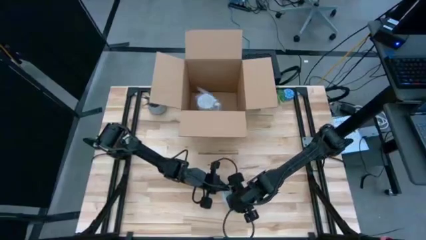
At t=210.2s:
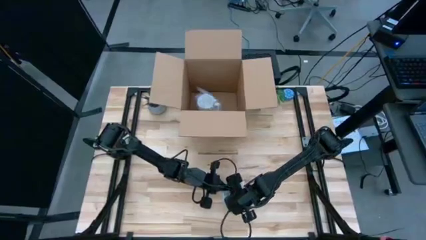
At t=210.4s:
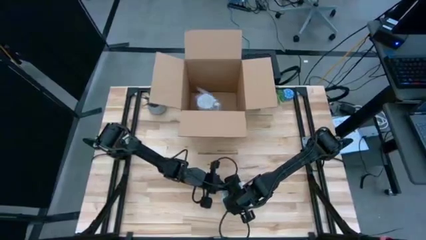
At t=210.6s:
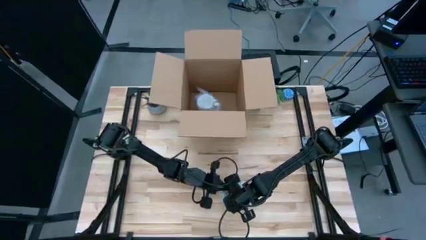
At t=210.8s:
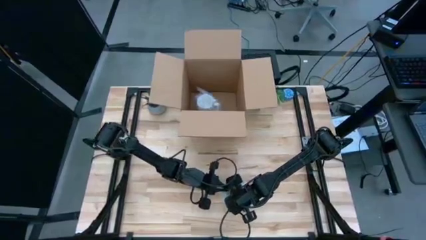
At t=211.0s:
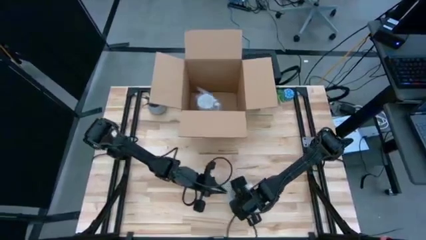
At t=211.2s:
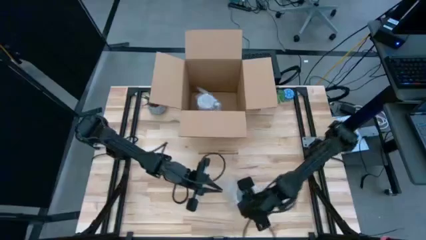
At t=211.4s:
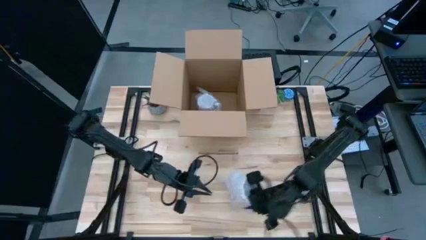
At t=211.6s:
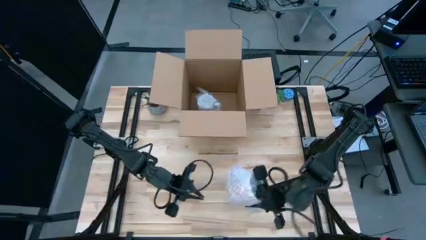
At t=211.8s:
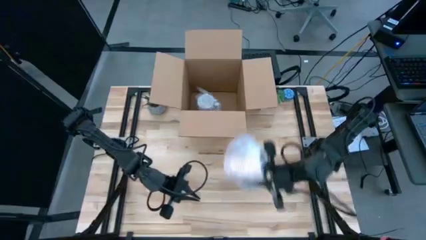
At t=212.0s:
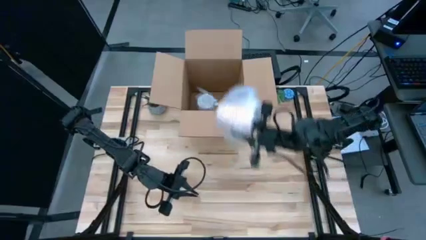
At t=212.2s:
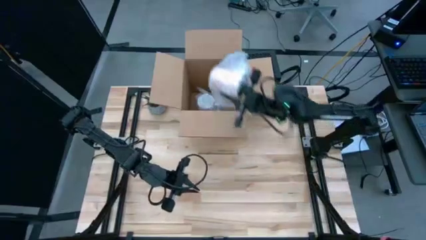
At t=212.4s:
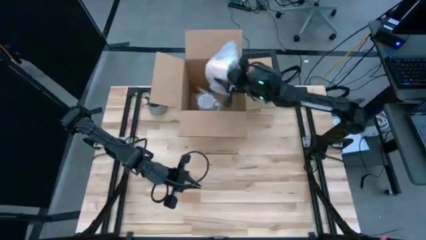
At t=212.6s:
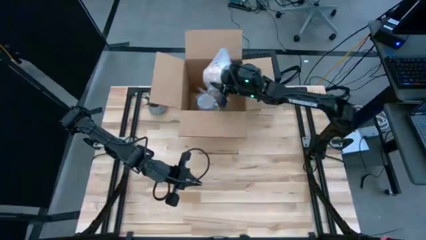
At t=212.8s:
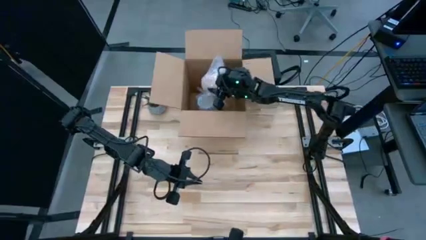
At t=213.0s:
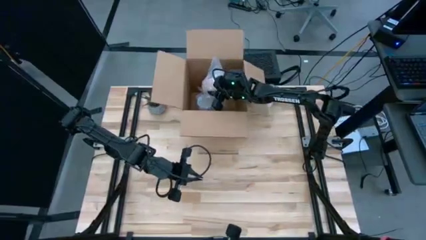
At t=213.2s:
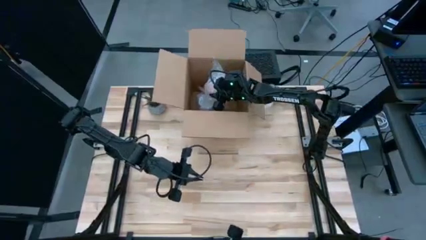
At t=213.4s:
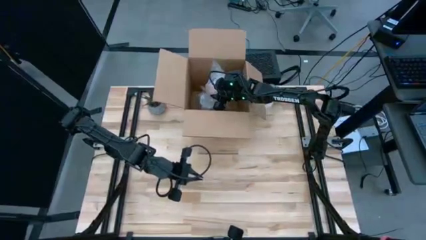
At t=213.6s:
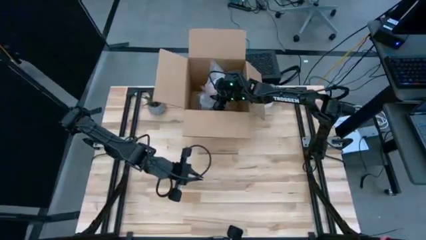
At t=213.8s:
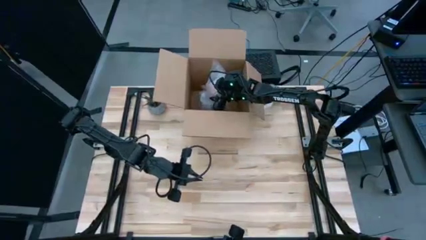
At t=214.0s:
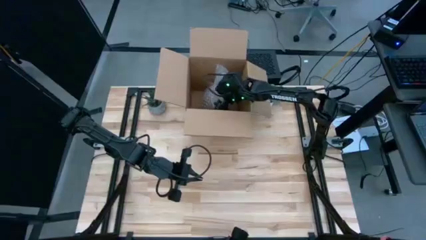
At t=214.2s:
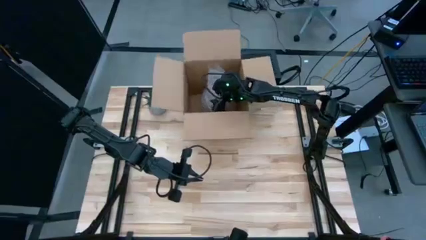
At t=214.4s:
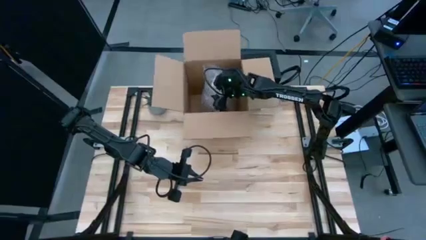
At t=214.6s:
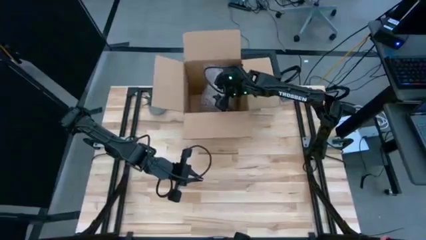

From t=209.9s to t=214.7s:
Task: wrap mug
Put the wrapped orange mug into the box

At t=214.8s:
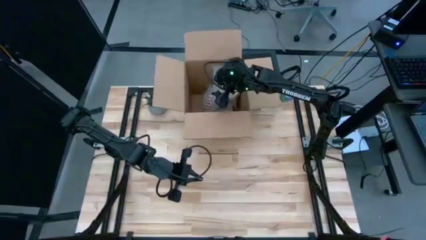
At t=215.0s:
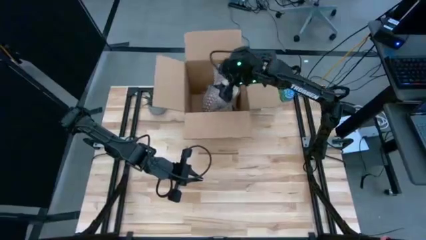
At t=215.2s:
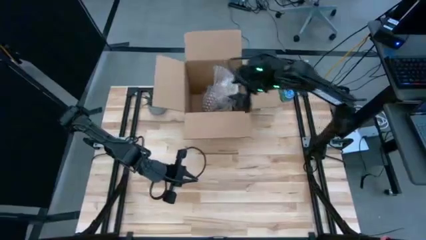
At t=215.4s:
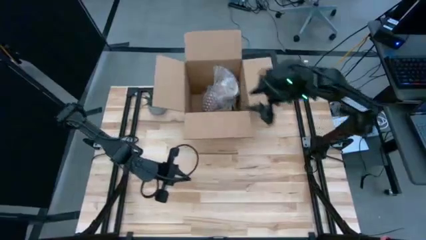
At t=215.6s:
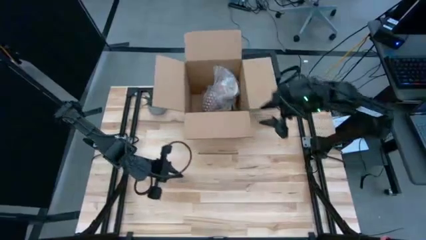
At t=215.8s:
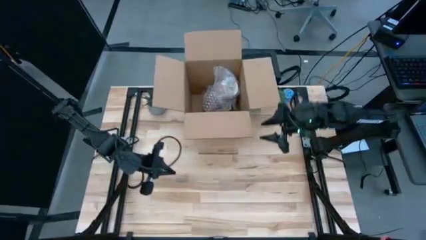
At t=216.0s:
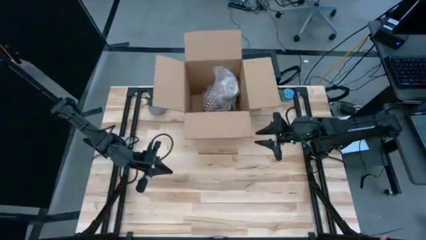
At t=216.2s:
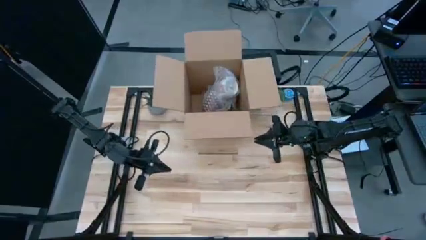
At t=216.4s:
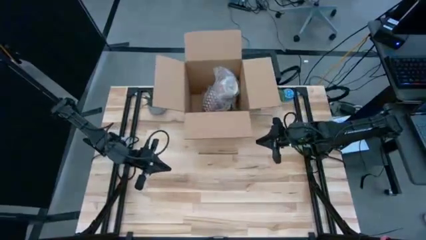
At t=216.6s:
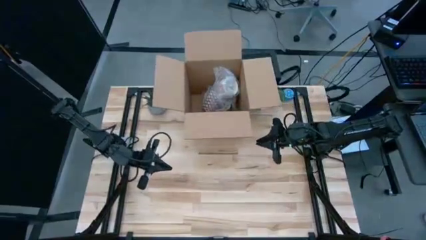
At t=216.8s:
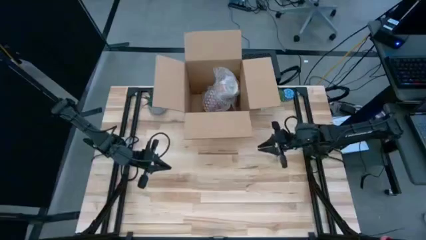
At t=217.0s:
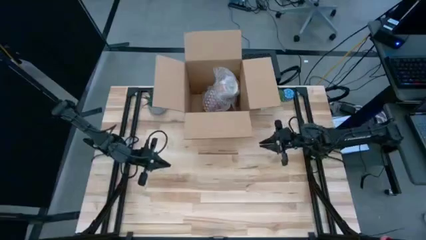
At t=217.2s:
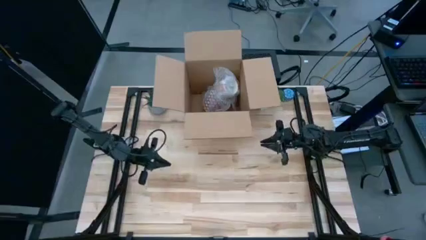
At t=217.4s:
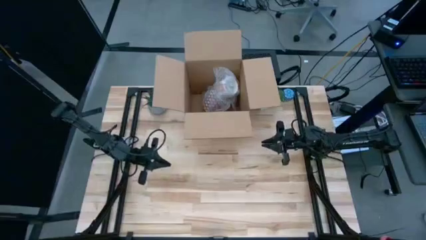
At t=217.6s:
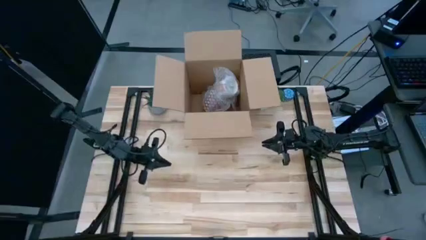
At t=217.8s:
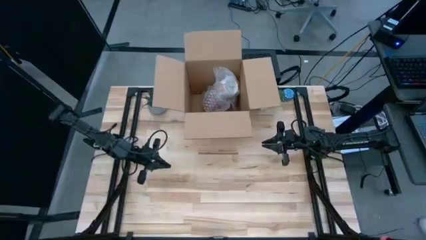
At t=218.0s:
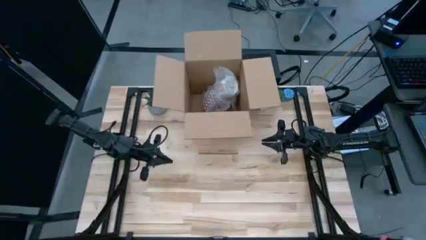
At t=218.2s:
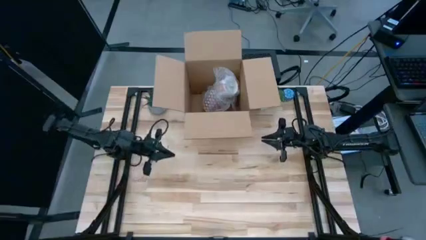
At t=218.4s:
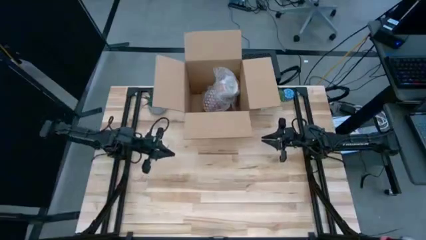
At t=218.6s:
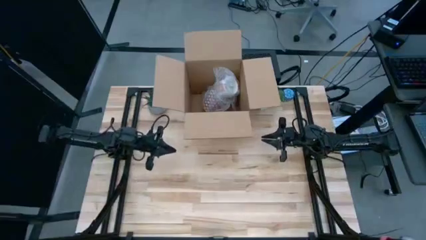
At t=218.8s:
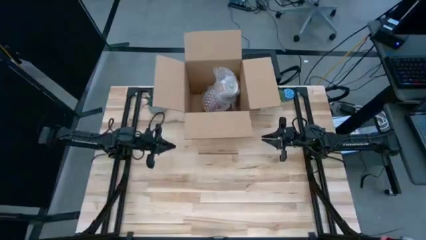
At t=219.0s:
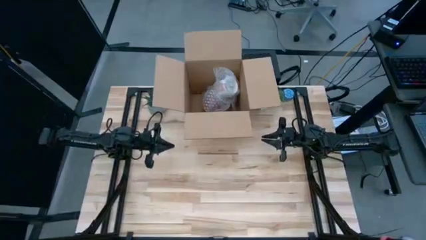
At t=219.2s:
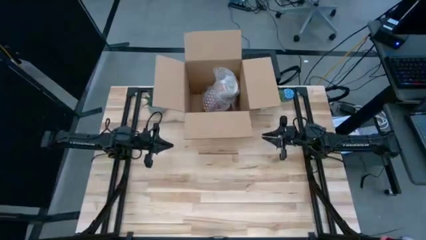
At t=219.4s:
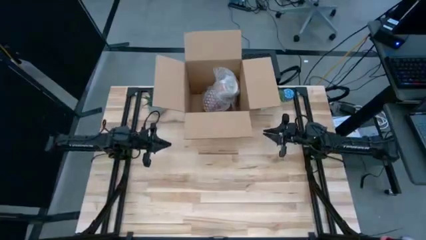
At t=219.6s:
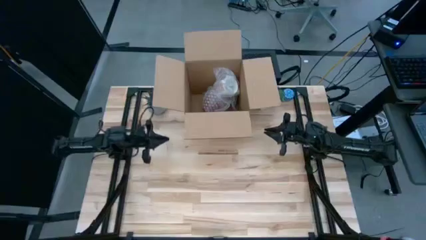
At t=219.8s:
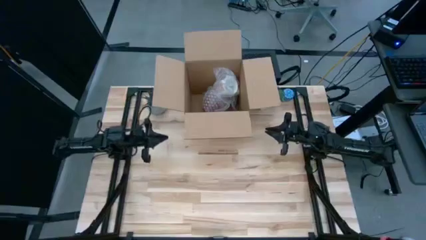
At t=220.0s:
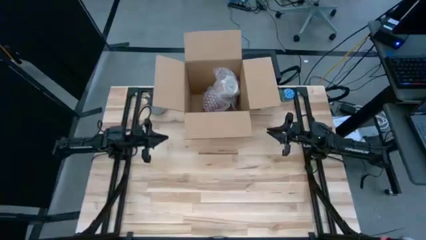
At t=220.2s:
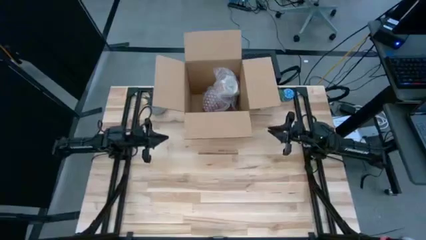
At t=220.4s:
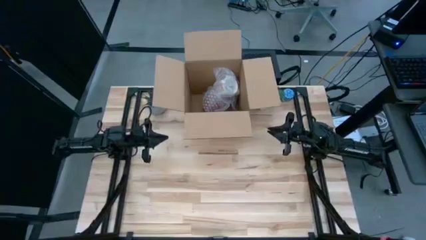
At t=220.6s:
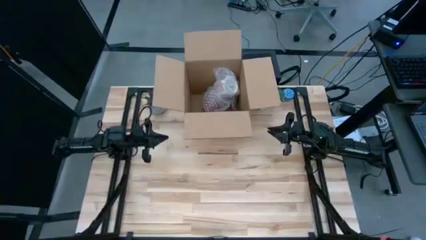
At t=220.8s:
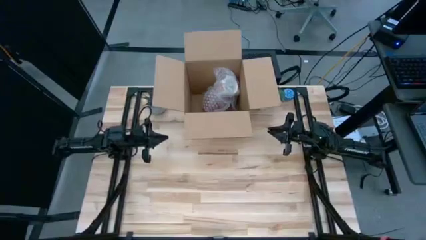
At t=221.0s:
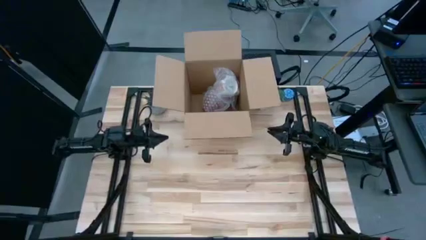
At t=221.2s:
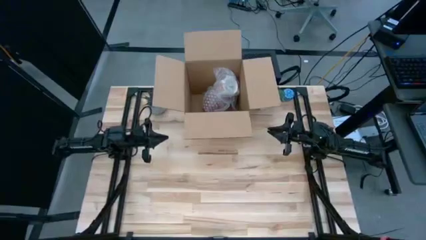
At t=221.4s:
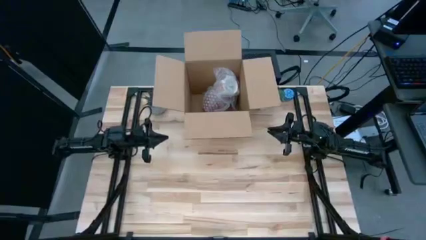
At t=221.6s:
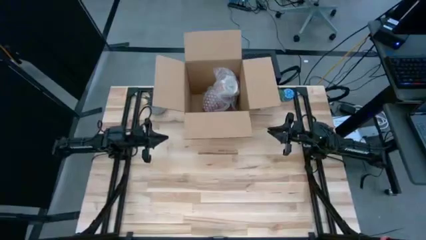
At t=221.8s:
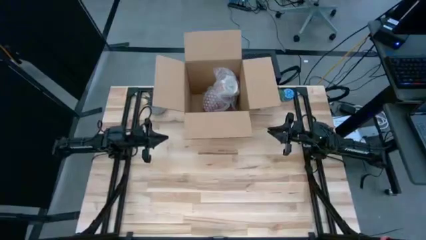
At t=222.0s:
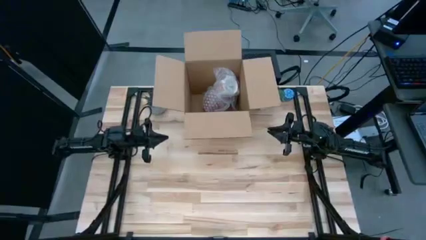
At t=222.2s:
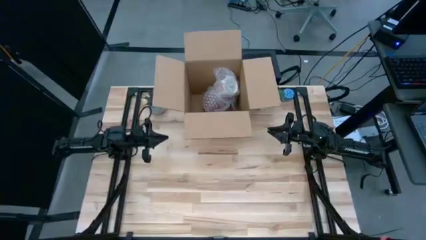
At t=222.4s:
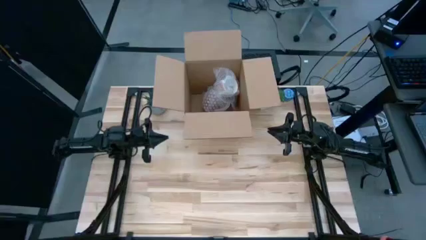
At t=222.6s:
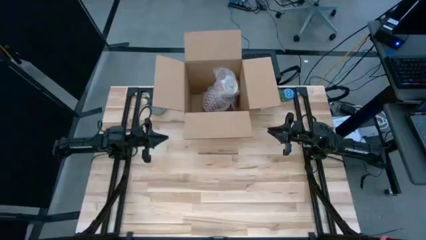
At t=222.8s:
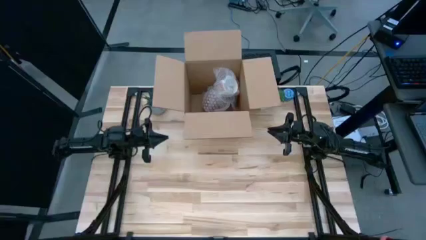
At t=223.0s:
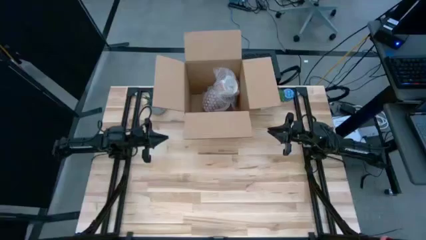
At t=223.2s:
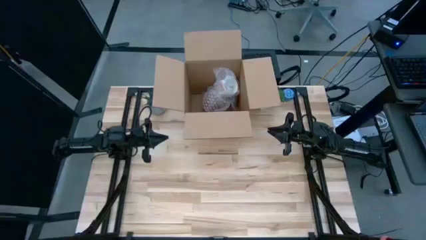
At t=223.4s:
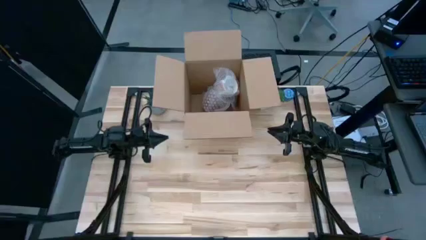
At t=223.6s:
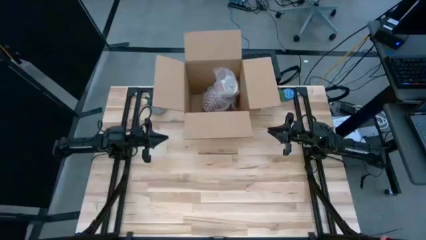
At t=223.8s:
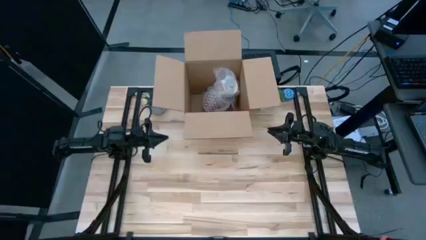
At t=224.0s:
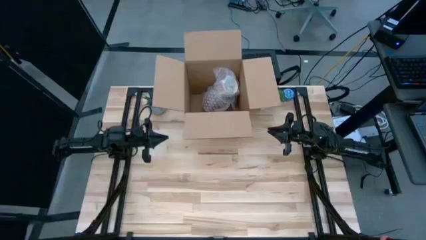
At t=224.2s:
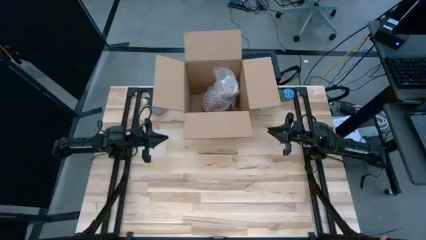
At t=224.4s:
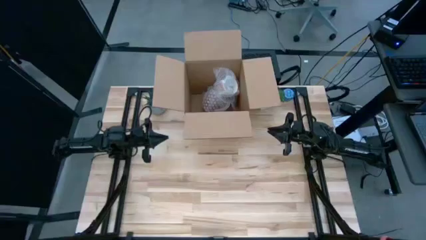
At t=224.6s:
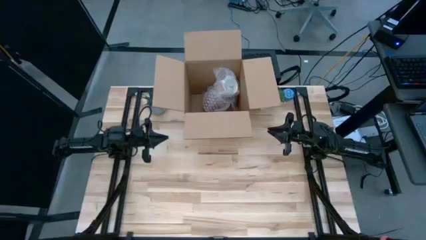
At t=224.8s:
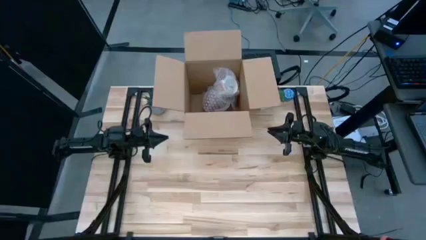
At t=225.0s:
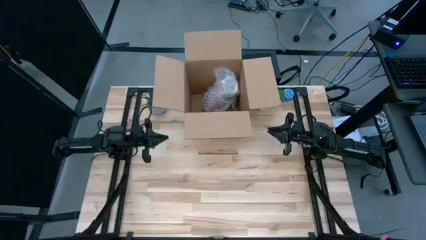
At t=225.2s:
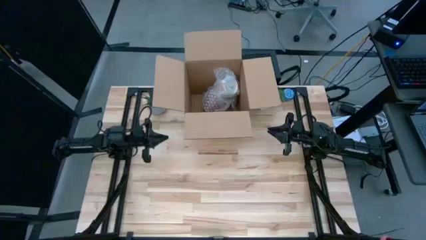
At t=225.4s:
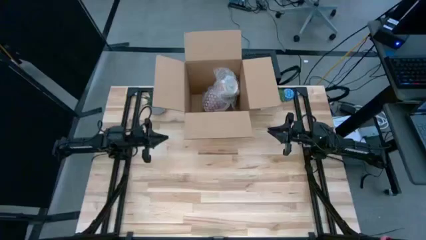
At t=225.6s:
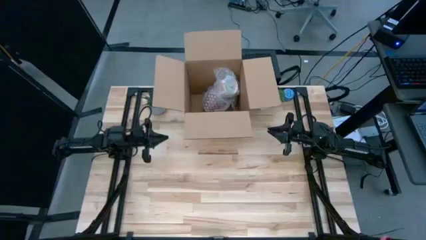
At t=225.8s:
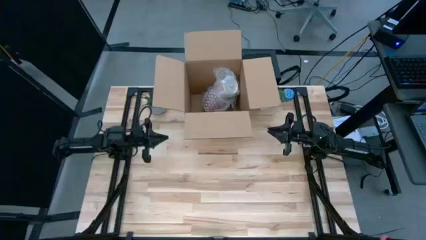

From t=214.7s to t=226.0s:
Return to Home Position
